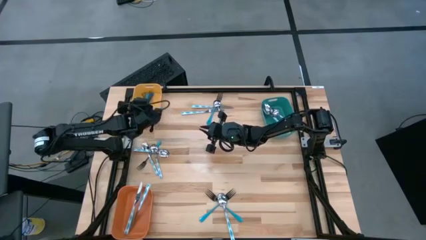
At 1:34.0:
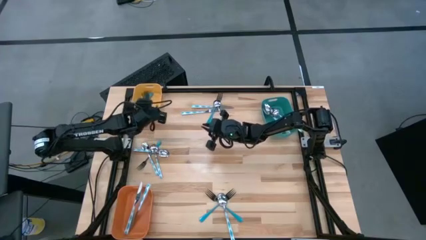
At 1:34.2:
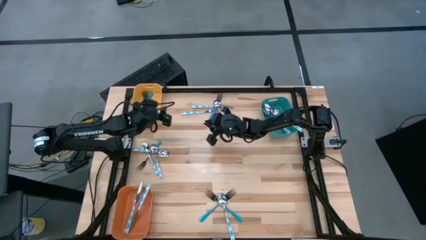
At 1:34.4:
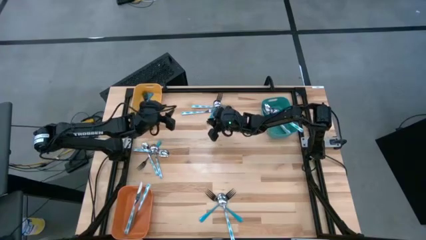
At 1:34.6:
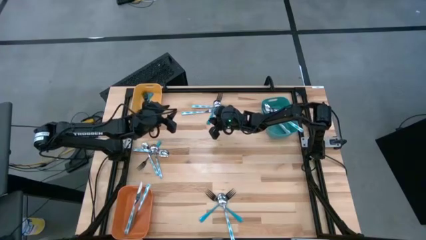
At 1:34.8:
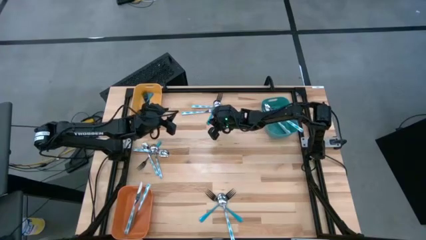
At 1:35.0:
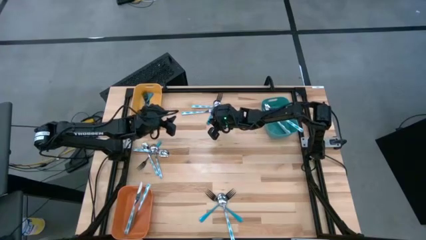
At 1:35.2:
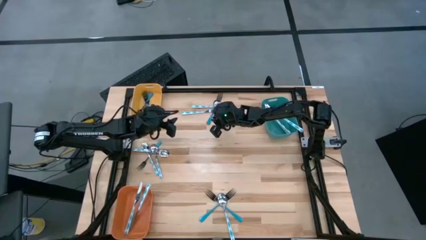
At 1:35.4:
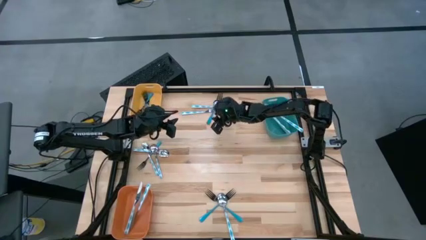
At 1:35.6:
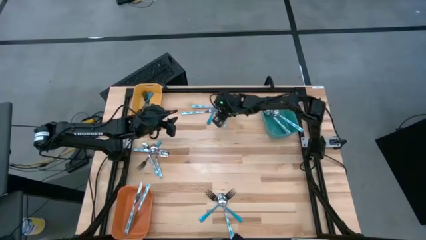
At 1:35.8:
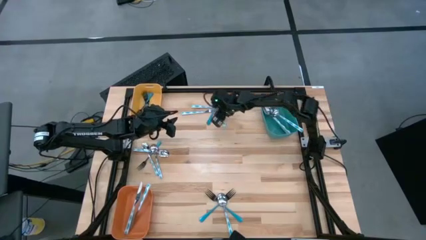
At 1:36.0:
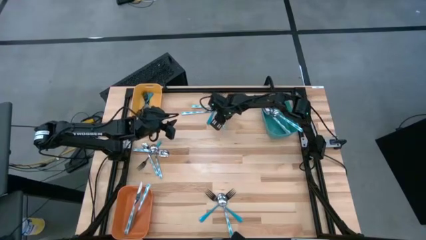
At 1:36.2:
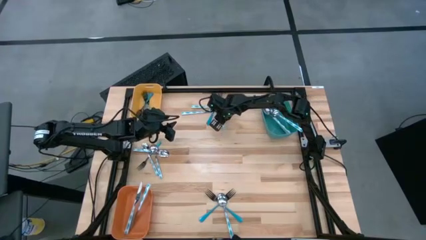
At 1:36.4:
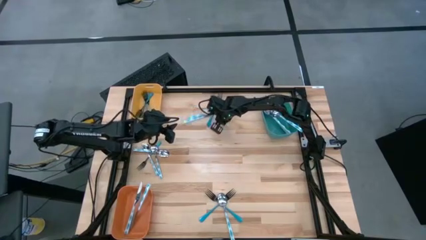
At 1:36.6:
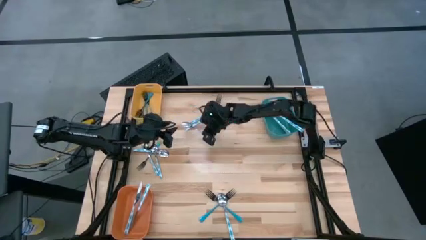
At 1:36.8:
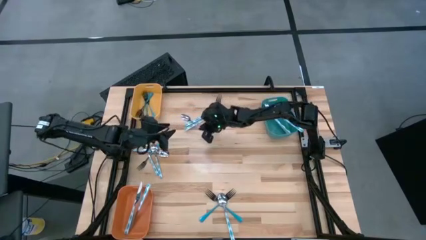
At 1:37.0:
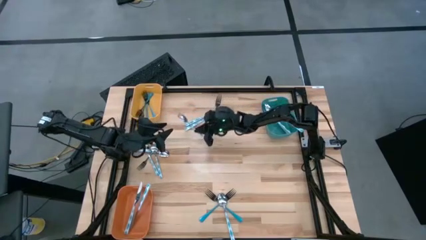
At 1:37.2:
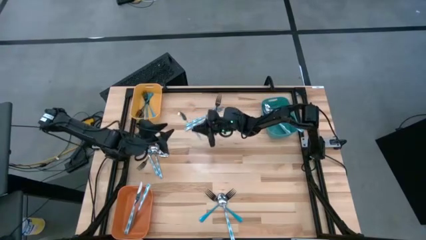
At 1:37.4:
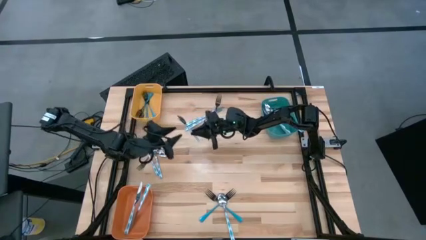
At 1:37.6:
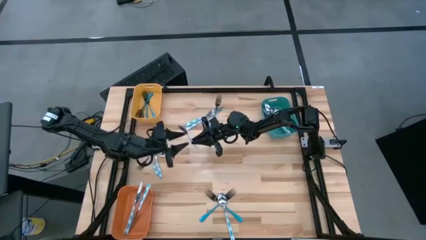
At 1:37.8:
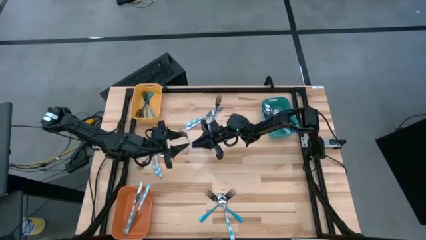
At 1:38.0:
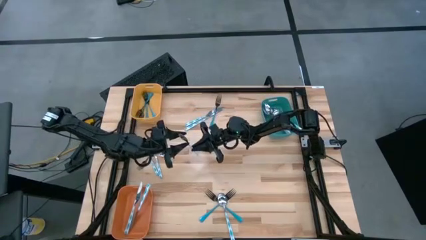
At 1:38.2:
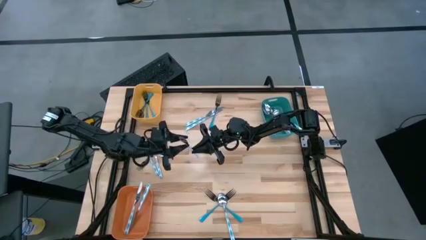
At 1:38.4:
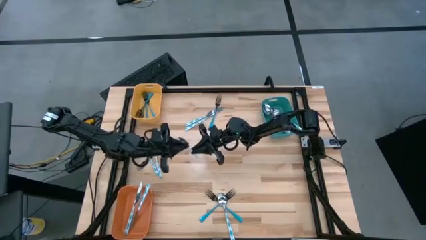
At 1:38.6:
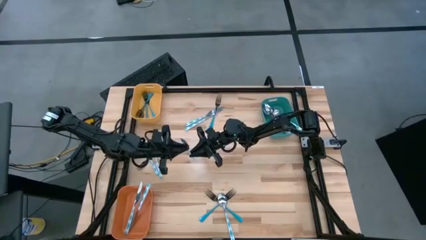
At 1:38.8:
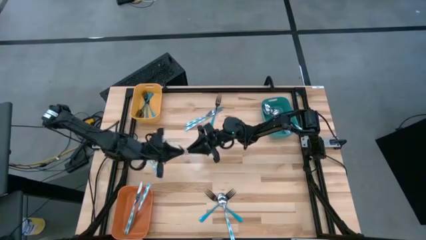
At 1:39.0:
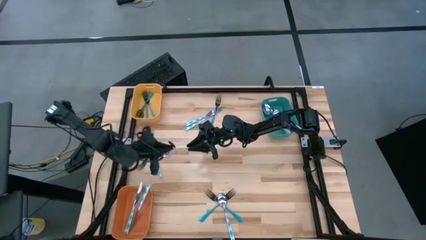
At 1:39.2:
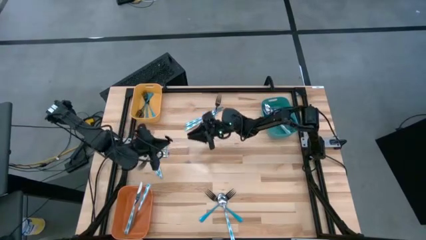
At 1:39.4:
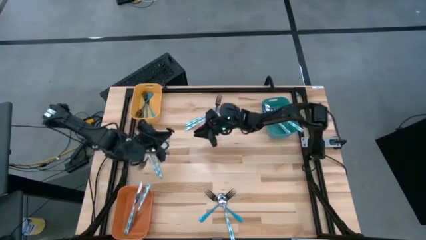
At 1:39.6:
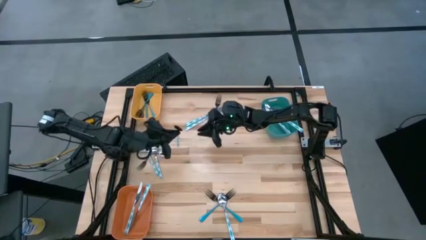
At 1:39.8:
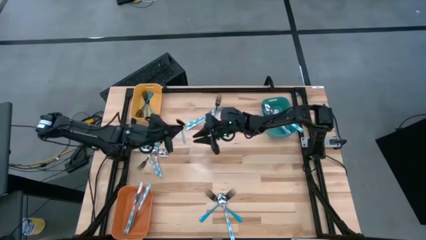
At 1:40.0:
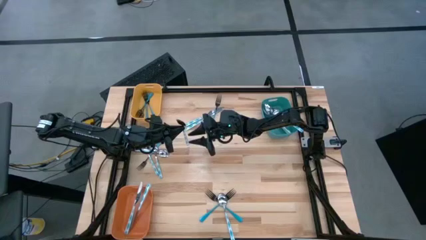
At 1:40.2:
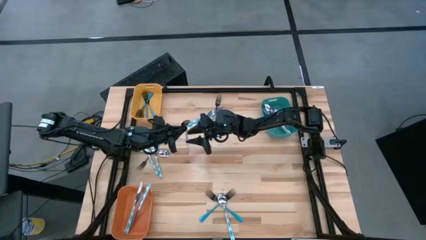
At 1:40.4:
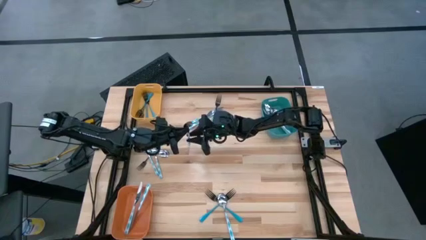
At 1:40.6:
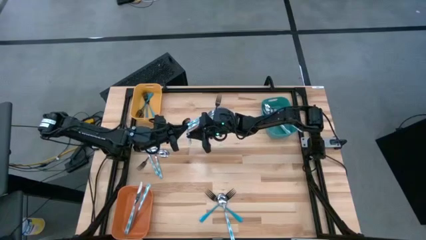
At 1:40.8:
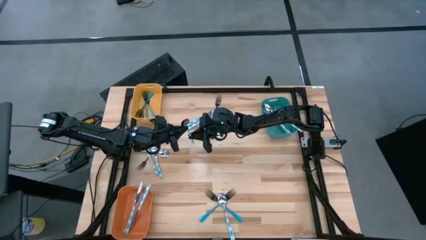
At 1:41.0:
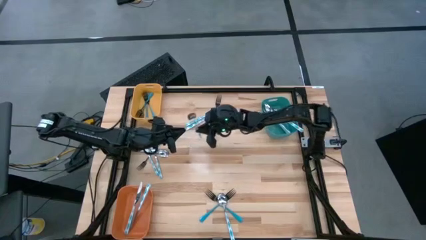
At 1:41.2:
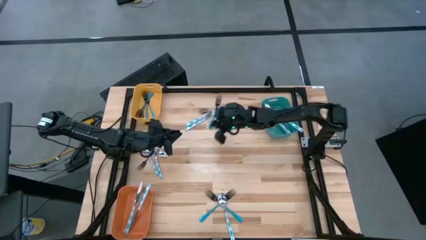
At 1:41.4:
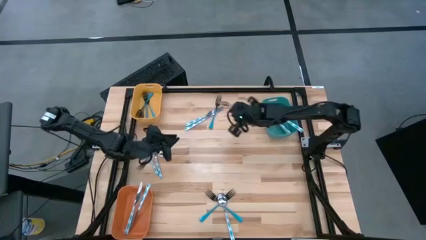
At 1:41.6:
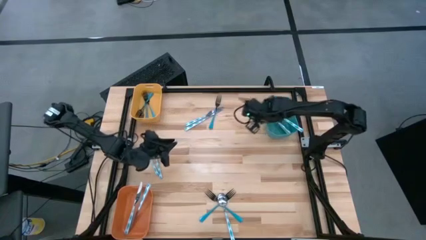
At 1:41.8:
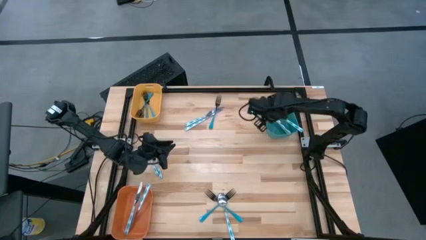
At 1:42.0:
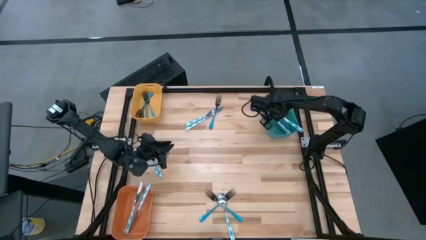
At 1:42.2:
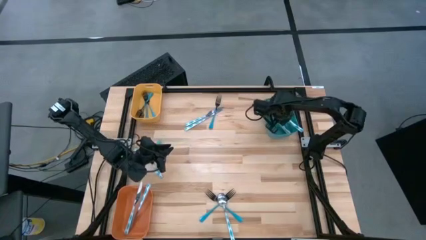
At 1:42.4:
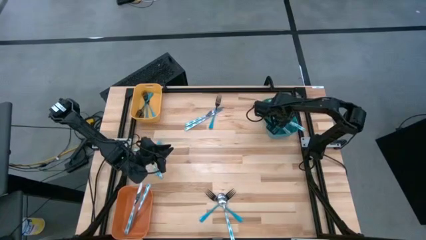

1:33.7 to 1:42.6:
Task: Sort silverware by color (type)
Put the white-blue spoon into the blue bin

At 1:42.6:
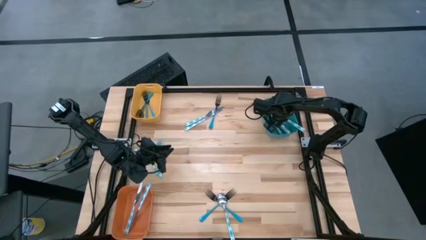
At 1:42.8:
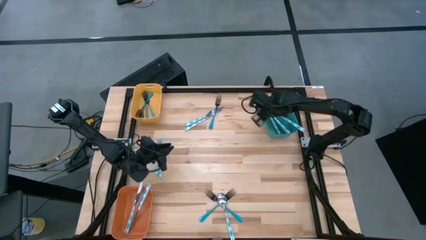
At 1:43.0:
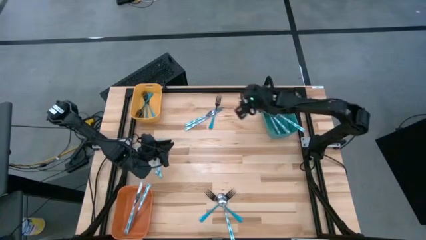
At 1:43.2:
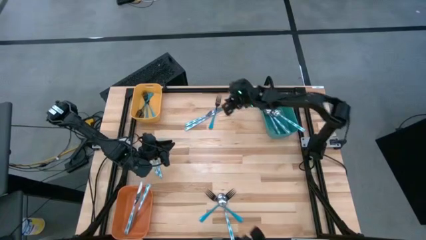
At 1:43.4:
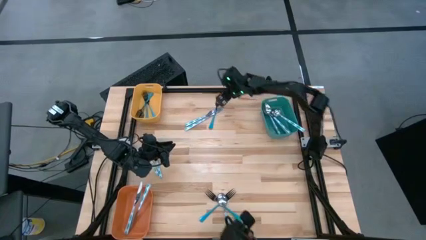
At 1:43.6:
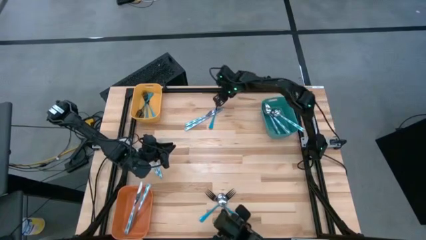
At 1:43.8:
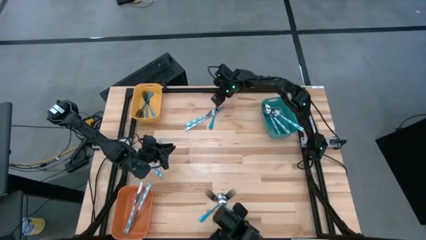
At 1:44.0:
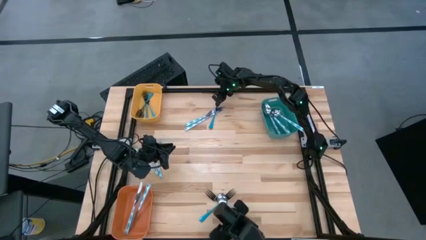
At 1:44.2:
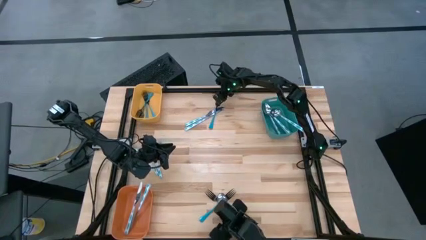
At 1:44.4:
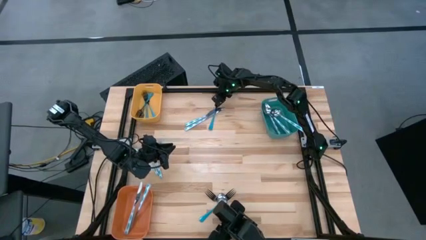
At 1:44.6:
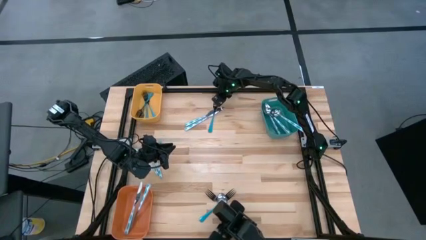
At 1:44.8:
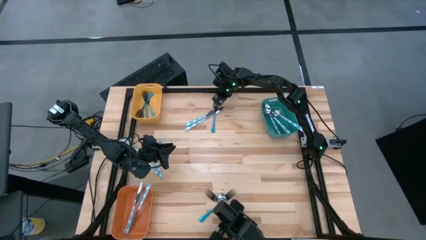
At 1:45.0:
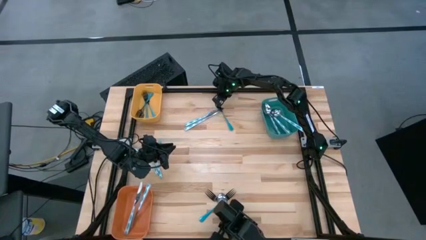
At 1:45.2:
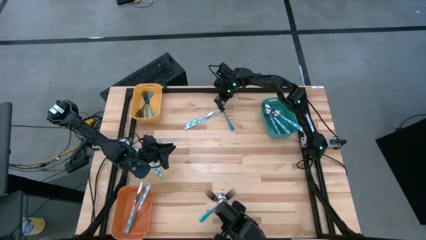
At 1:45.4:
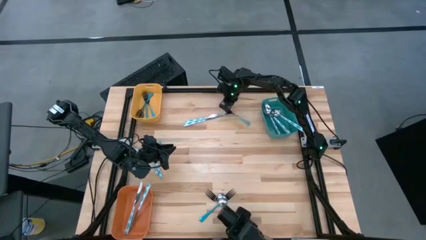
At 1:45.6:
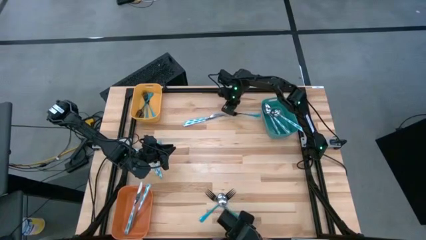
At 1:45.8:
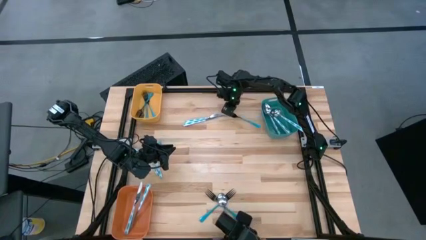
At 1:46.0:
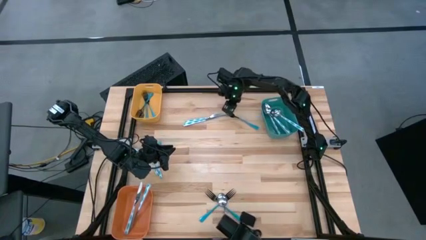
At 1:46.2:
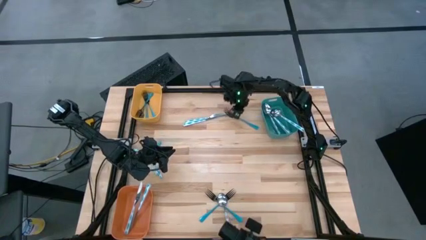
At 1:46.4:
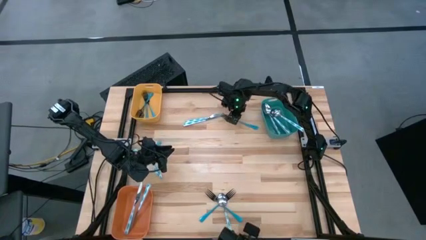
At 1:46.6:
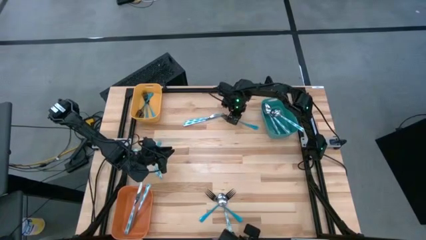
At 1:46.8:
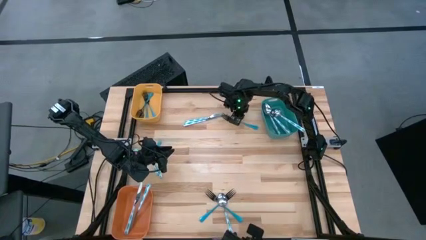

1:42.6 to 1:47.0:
Put the blue fork into the yellow bin
